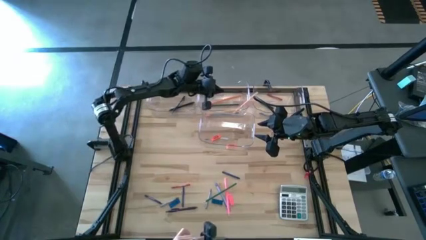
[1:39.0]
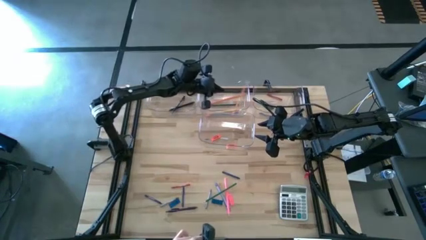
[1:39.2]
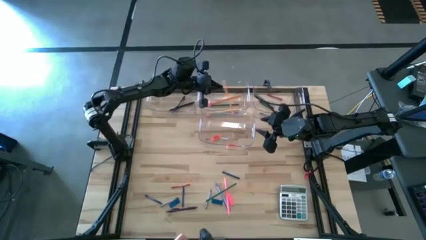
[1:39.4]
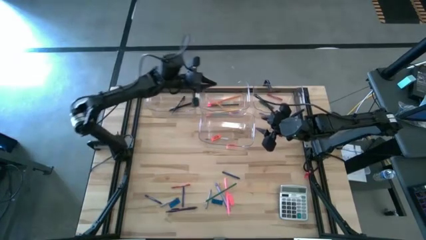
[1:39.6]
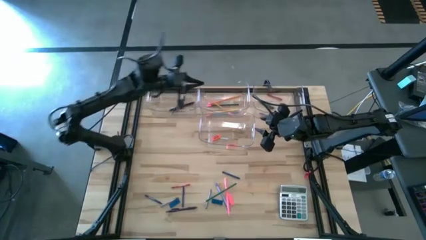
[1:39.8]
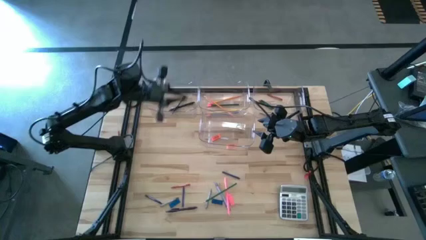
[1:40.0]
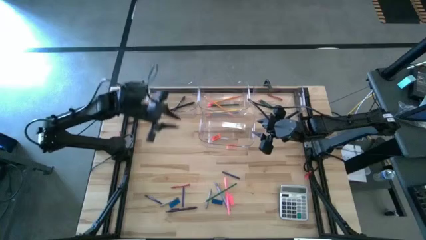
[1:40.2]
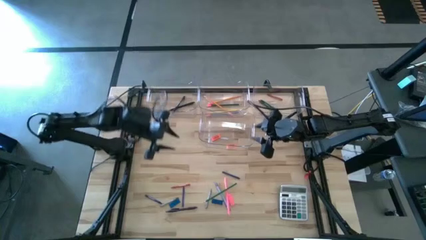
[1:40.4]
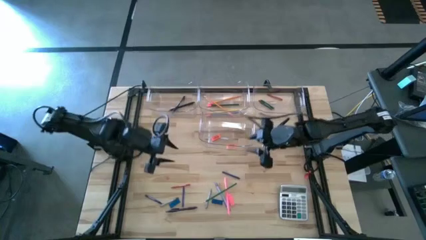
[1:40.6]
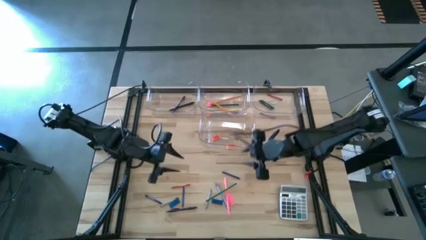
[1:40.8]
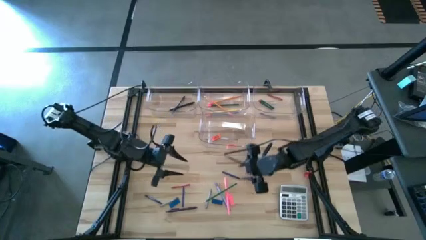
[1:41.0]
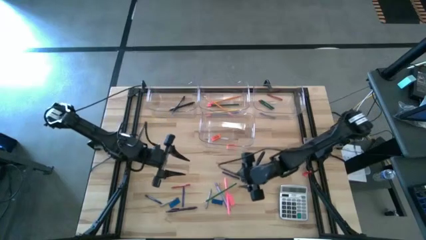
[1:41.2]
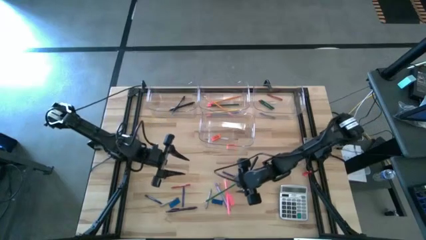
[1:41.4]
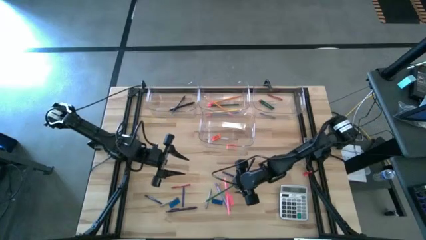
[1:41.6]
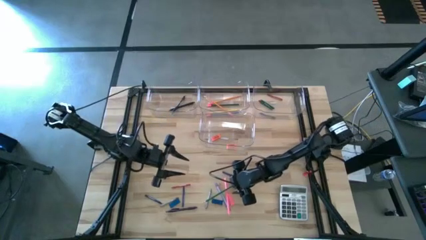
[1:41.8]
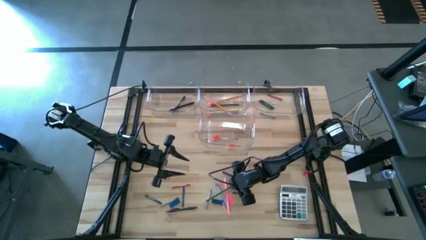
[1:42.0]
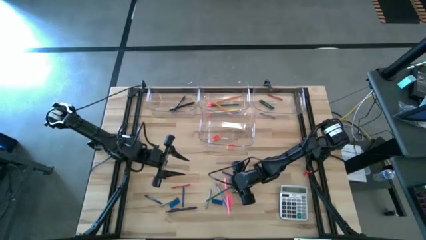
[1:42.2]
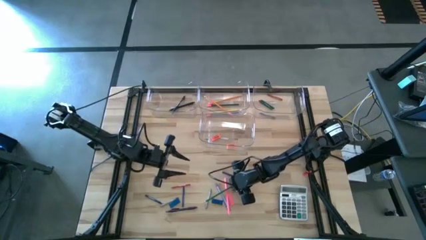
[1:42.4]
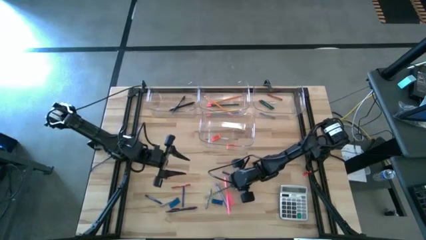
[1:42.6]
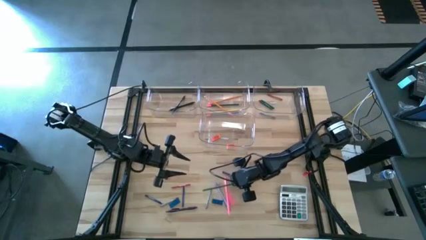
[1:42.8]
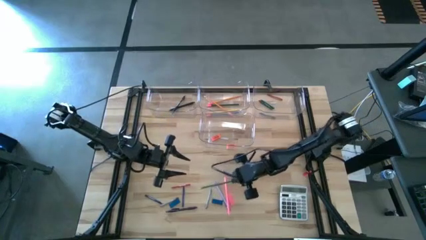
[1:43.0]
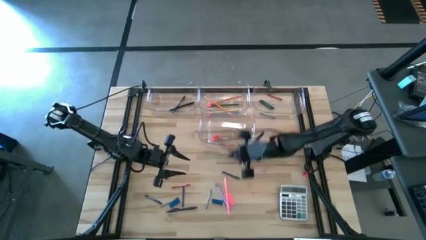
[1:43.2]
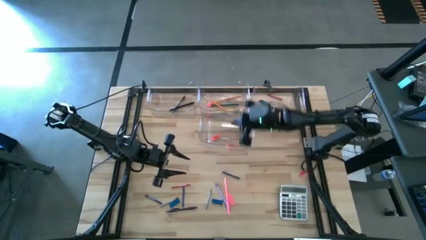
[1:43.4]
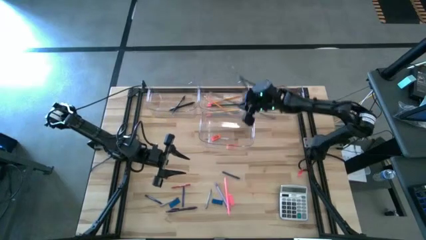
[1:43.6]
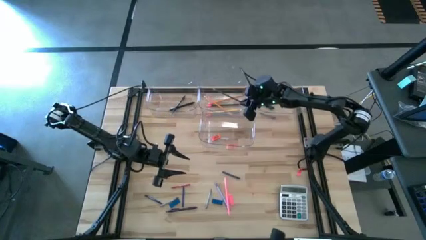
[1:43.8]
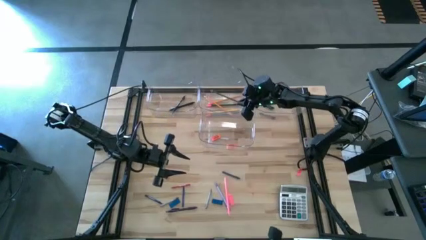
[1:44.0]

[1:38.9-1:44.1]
Task: Sort crayons/erasers/pens/pencils in bins
Put the green pencil into the top center transparent bin

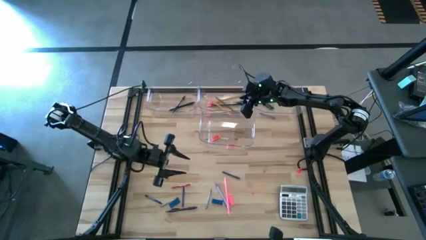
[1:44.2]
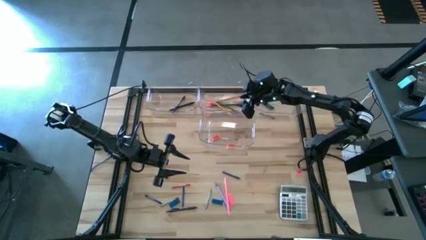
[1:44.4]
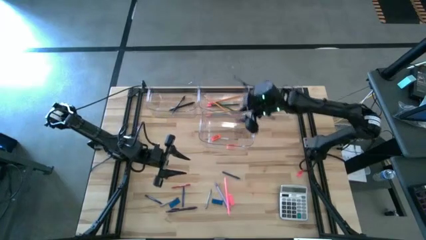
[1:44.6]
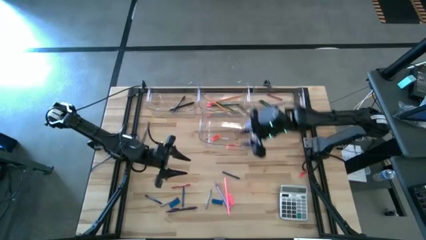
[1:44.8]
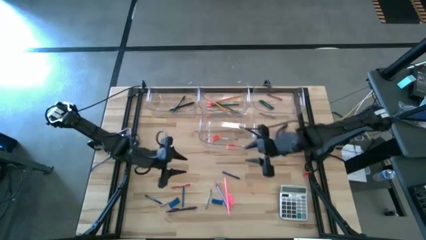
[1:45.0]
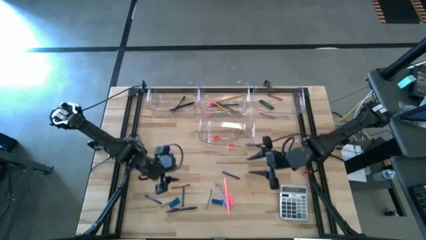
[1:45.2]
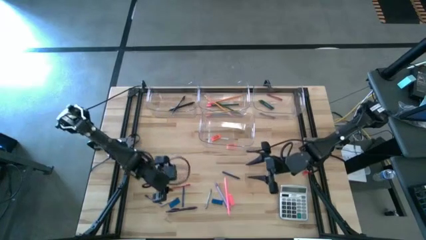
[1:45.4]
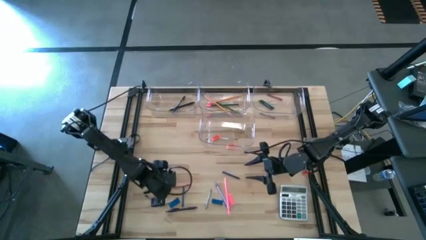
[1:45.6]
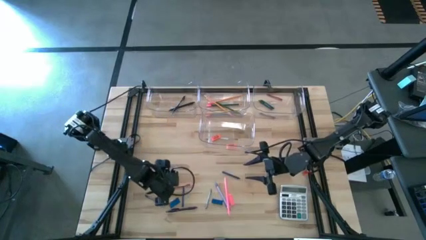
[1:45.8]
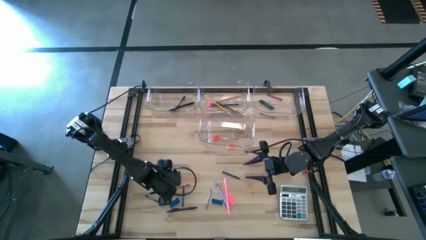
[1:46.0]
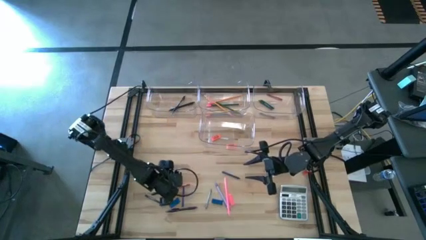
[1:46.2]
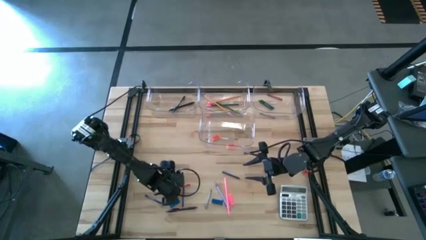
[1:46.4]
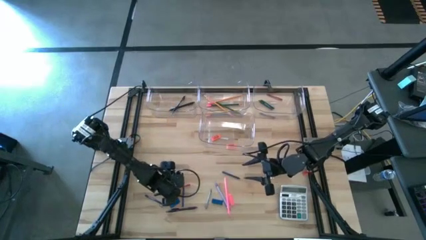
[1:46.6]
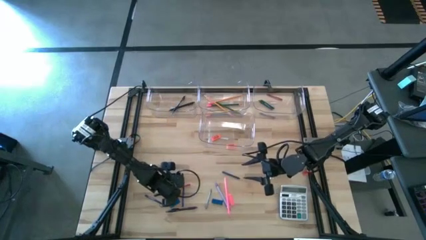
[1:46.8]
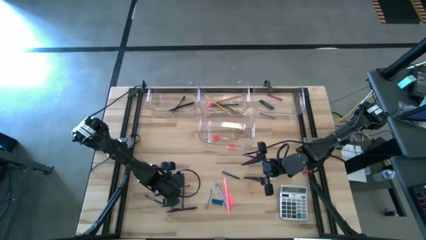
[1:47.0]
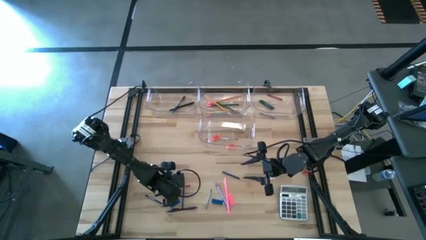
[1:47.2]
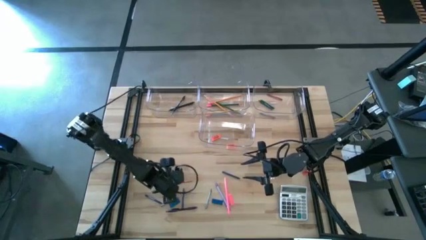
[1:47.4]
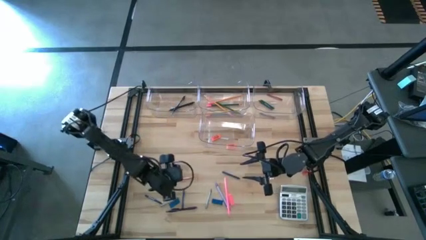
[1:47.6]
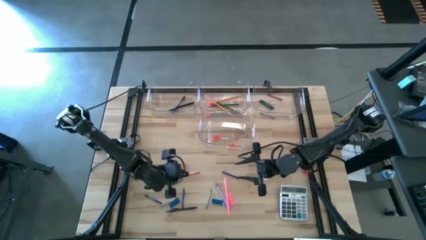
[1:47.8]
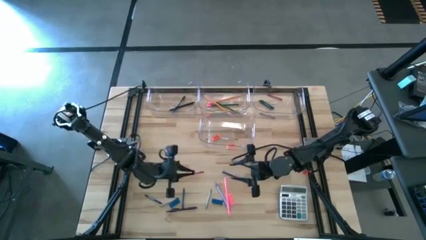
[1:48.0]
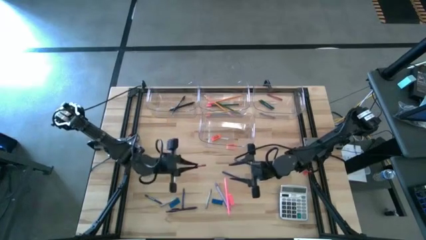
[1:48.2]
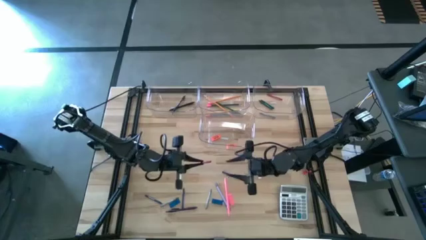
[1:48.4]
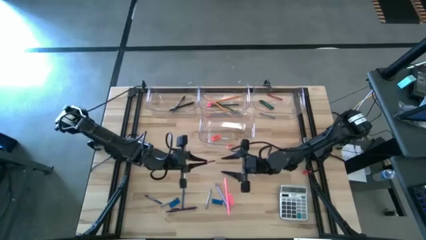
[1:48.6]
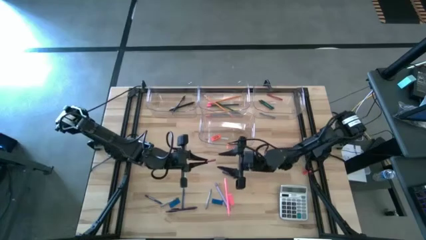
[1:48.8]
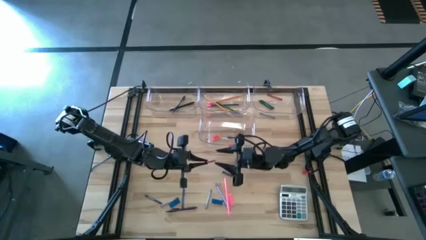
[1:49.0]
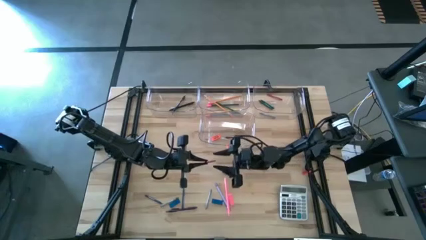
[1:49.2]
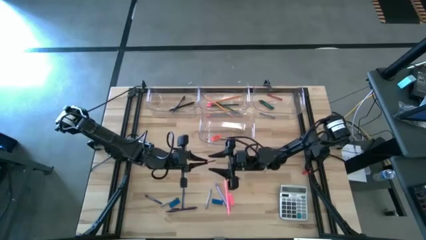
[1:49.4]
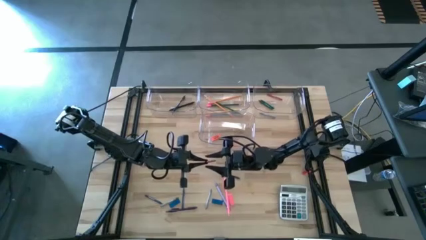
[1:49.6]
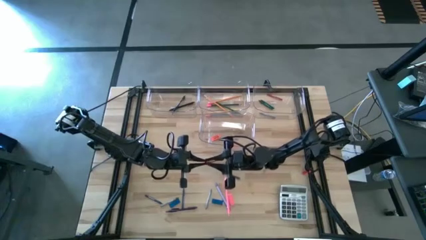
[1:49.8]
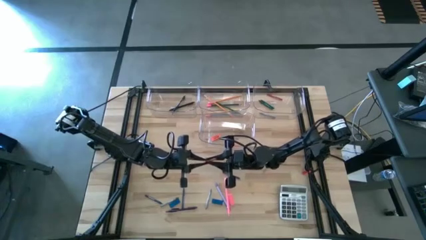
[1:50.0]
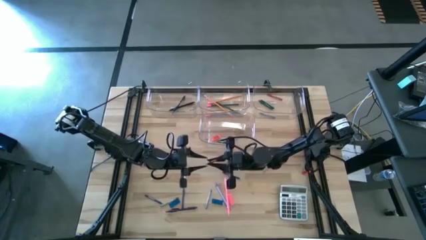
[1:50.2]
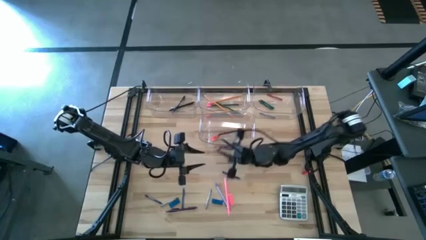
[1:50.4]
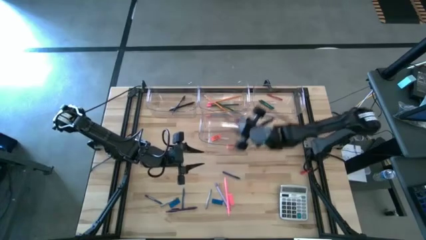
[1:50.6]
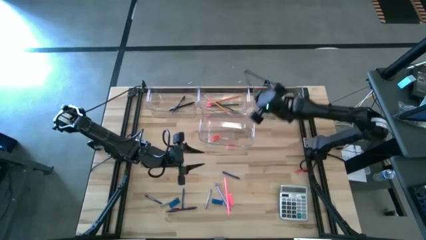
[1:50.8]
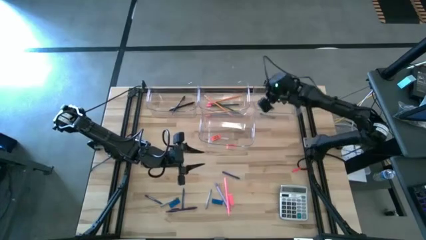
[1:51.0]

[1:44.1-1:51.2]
Put the red crayon into the top right transparent bin

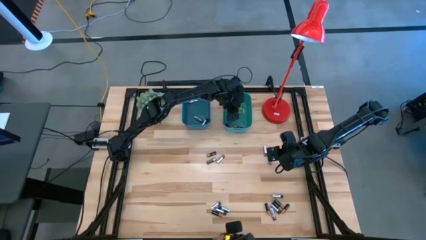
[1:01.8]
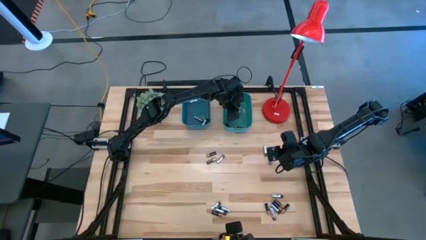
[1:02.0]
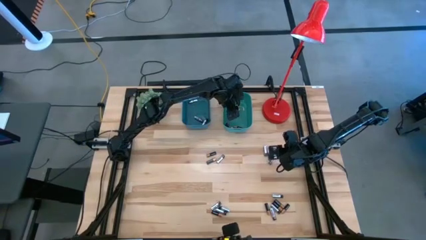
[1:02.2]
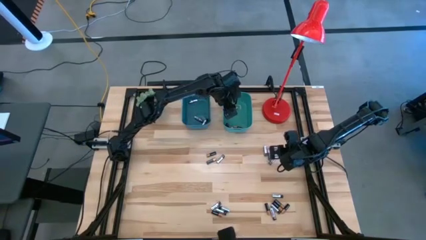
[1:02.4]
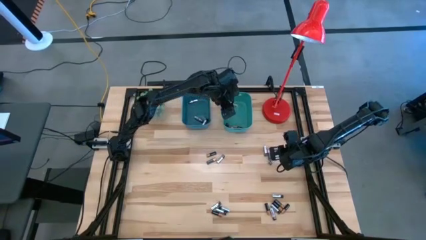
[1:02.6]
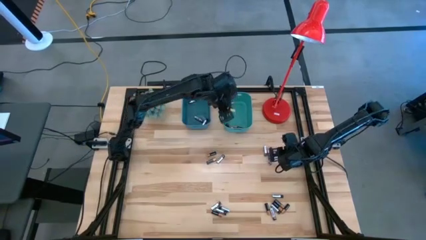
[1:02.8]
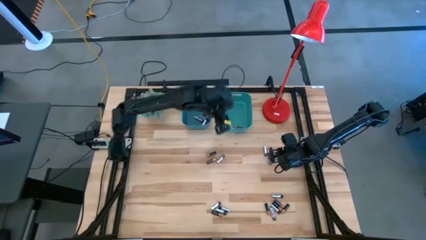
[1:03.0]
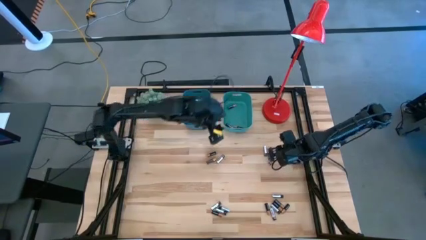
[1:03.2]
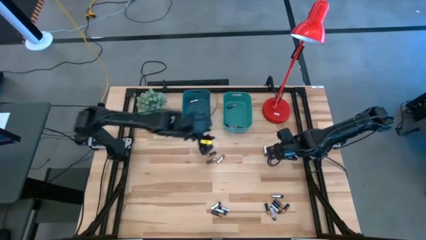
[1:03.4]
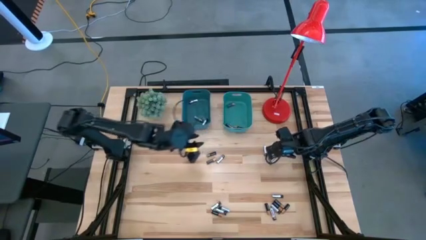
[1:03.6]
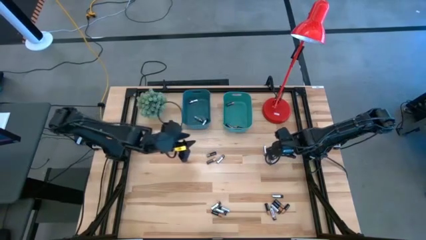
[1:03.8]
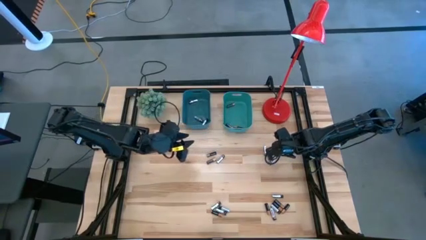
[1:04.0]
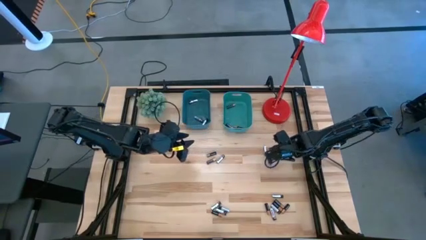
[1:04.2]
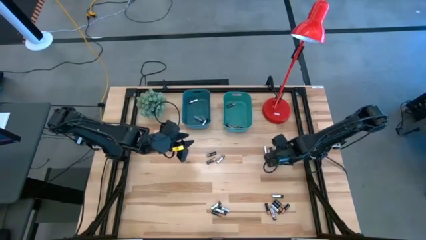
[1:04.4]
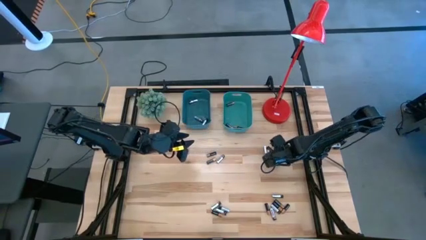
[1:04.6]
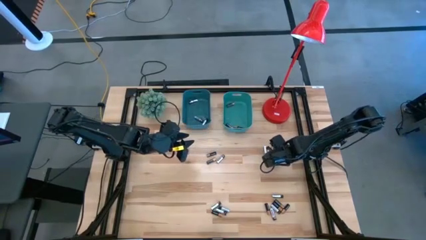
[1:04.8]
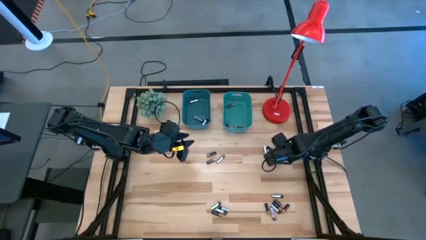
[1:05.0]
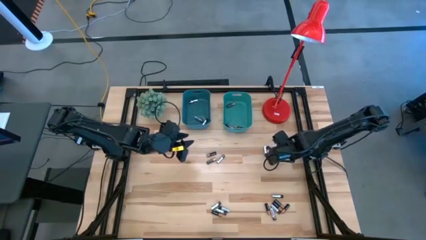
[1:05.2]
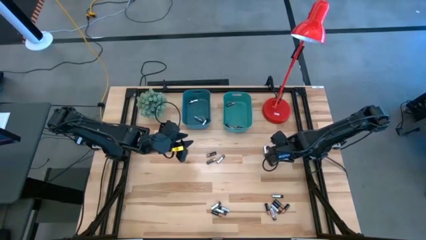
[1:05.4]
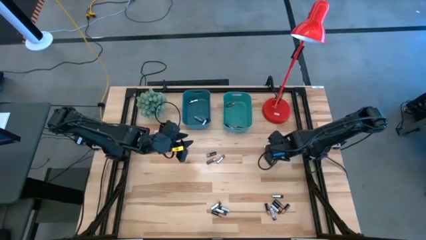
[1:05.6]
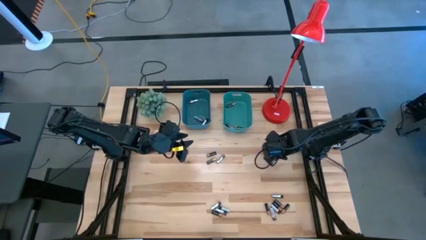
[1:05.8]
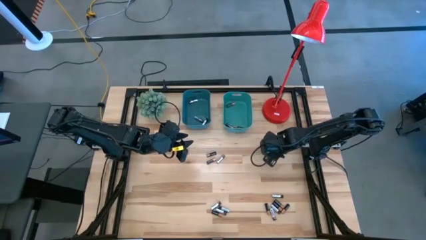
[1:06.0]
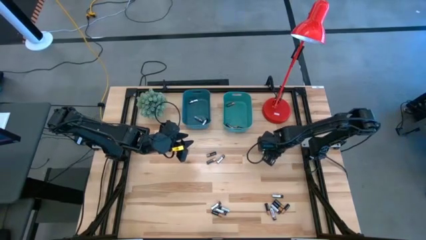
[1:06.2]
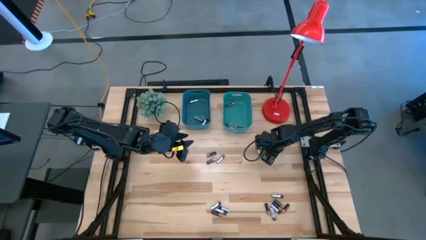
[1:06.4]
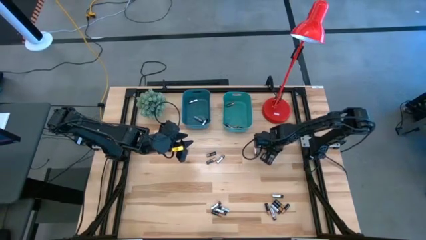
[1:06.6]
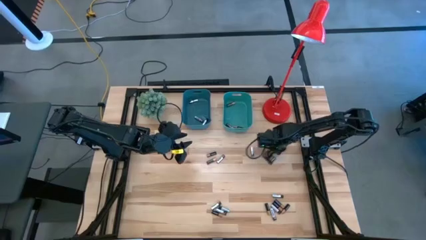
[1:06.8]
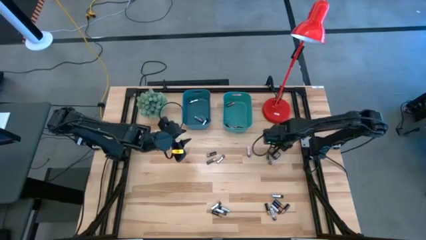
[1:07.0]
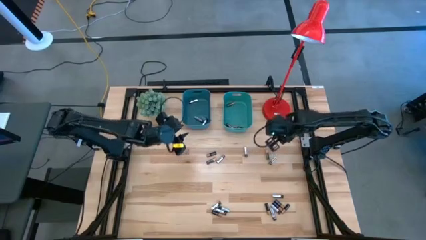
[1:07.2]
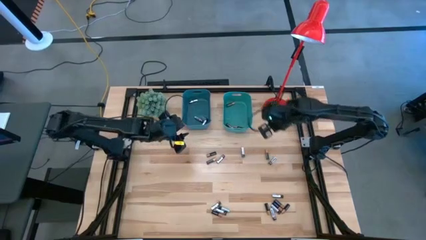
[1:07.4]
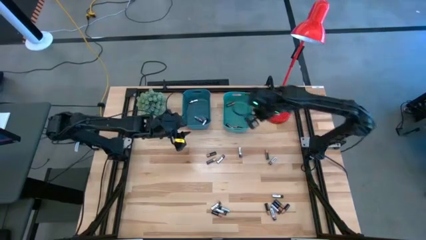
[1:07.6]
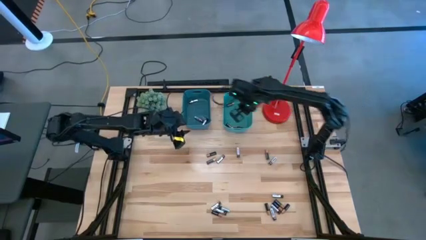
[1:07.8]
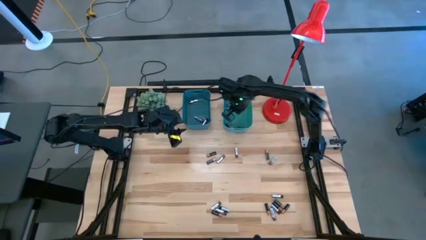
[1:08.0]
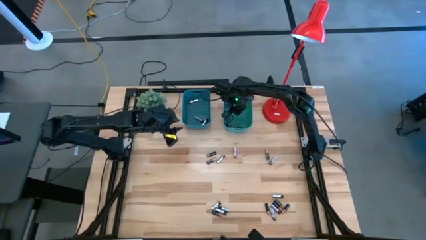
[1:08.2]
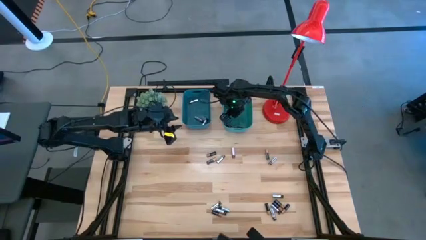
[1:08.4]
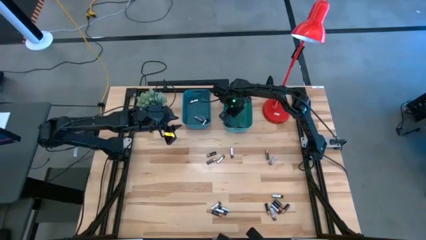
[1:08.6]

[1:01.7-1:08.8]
Task: Sort batteries
Put the black battery into the green bin
